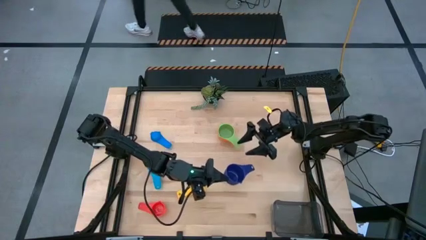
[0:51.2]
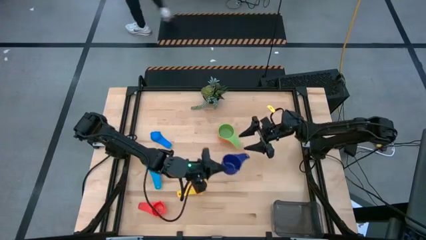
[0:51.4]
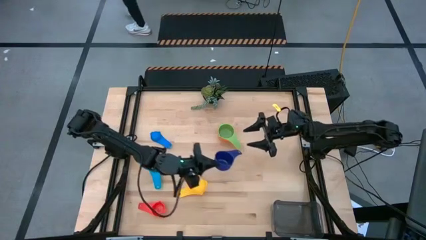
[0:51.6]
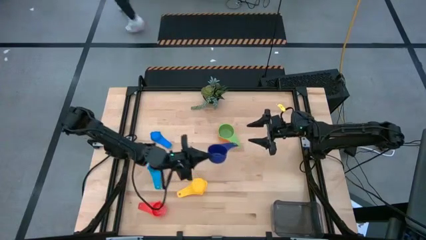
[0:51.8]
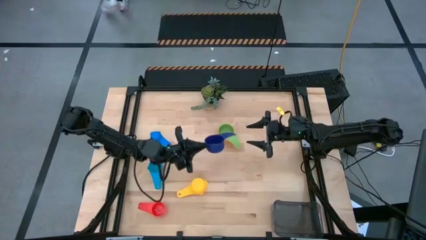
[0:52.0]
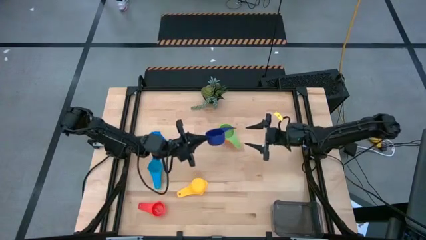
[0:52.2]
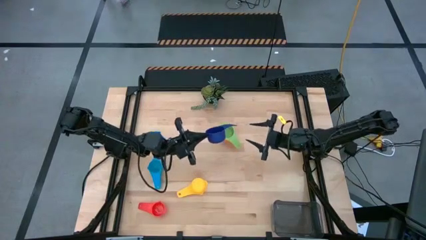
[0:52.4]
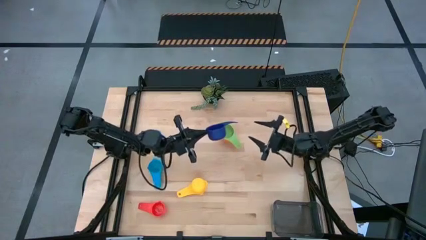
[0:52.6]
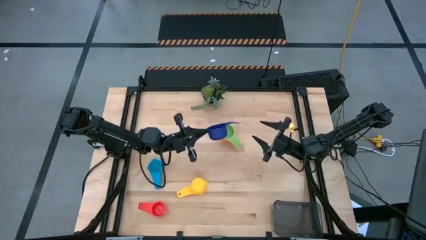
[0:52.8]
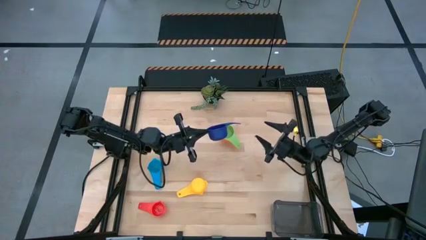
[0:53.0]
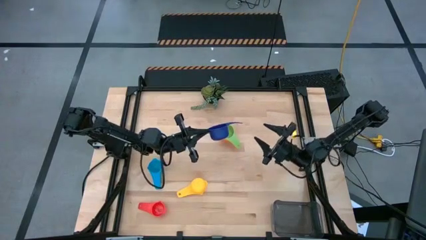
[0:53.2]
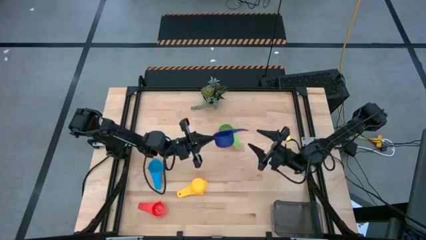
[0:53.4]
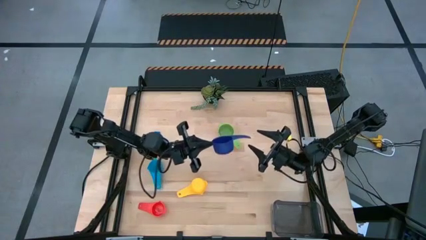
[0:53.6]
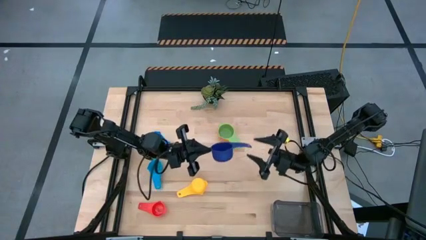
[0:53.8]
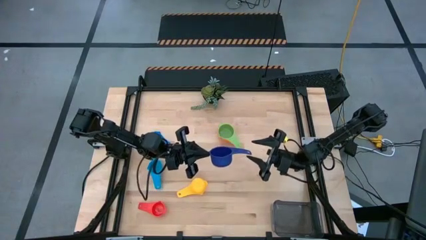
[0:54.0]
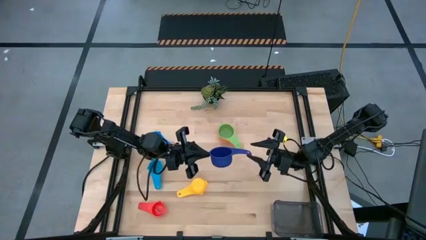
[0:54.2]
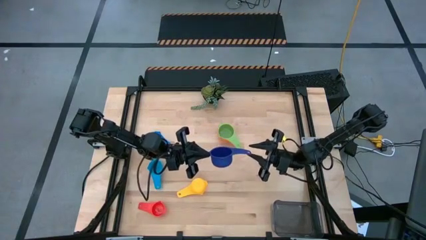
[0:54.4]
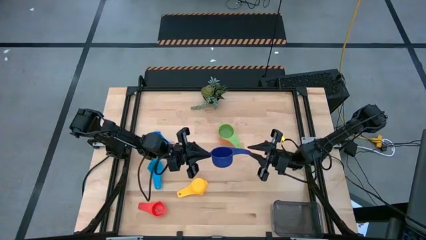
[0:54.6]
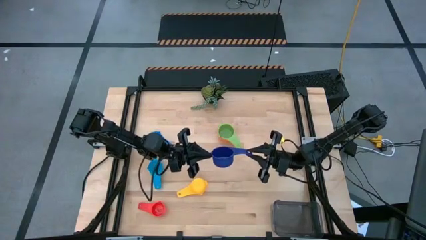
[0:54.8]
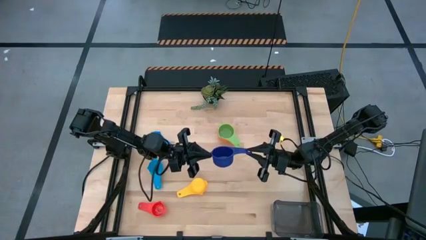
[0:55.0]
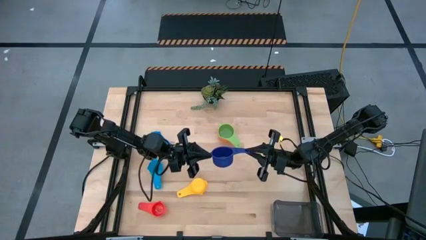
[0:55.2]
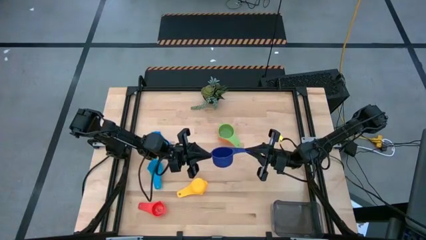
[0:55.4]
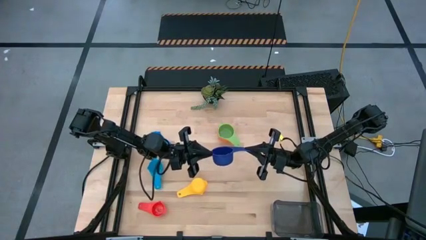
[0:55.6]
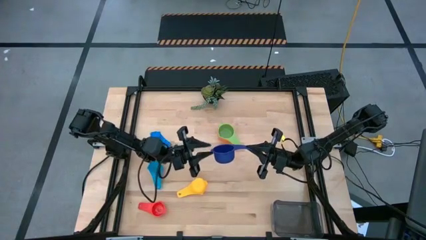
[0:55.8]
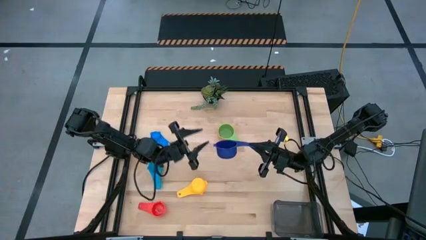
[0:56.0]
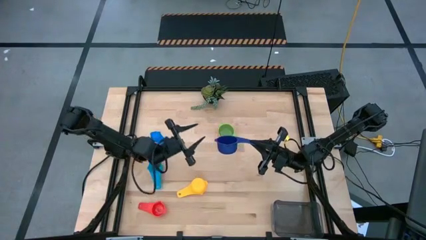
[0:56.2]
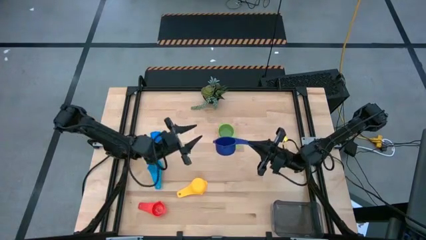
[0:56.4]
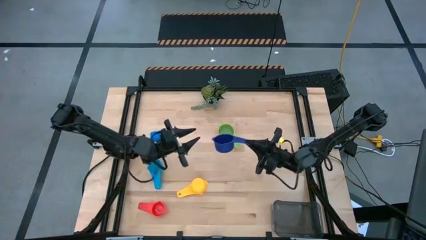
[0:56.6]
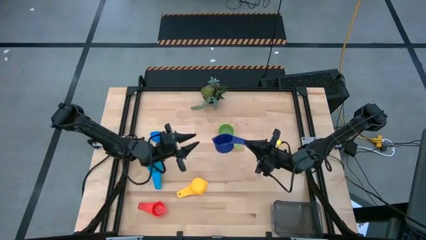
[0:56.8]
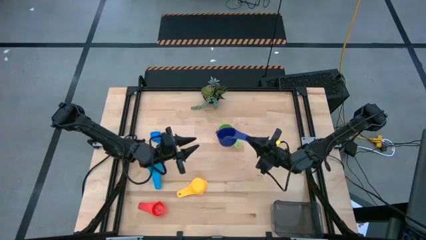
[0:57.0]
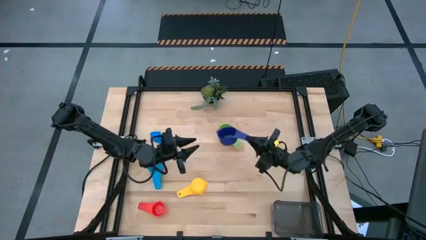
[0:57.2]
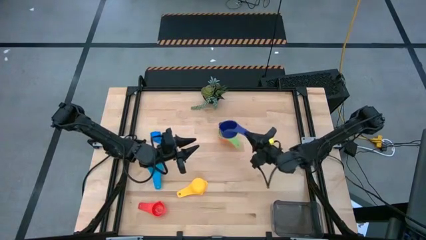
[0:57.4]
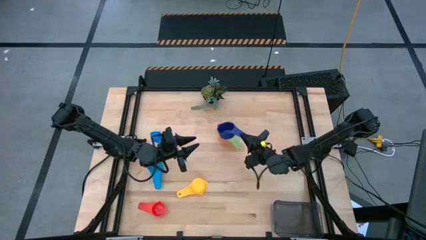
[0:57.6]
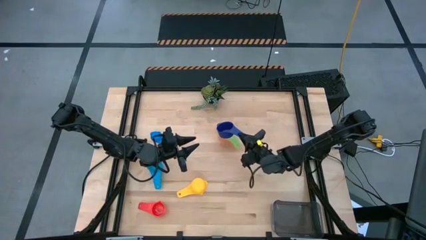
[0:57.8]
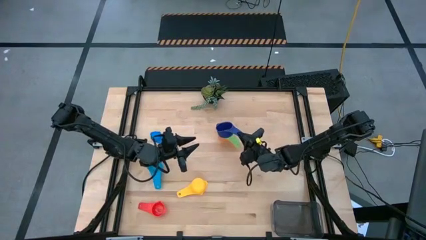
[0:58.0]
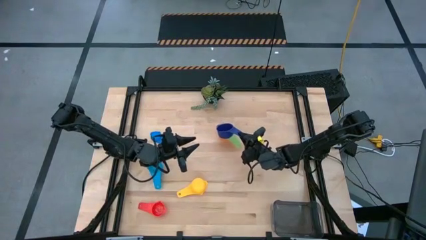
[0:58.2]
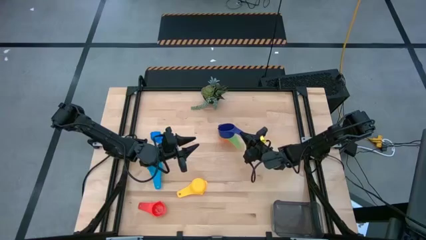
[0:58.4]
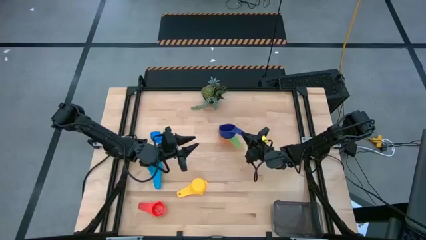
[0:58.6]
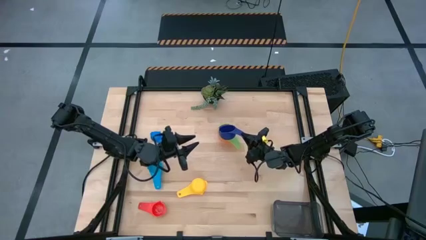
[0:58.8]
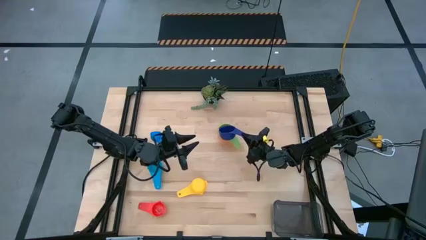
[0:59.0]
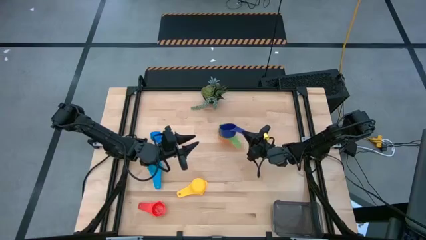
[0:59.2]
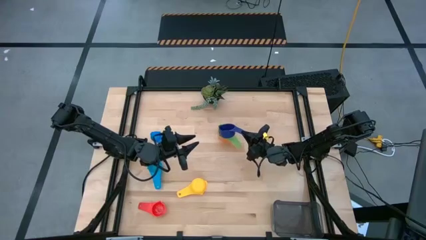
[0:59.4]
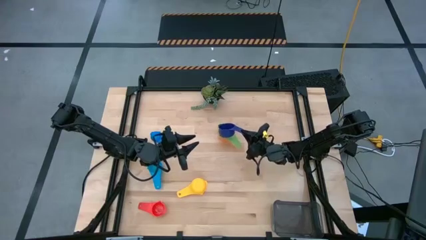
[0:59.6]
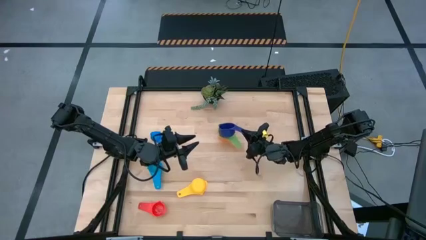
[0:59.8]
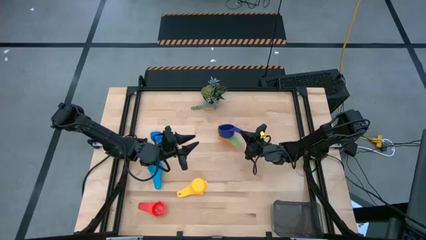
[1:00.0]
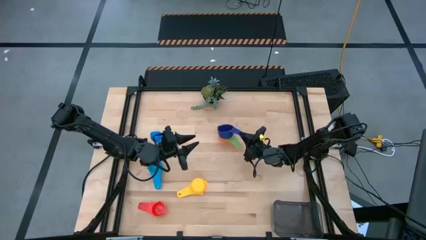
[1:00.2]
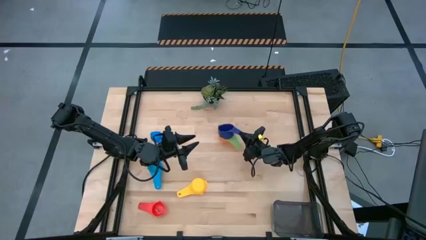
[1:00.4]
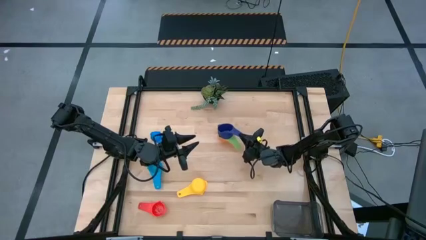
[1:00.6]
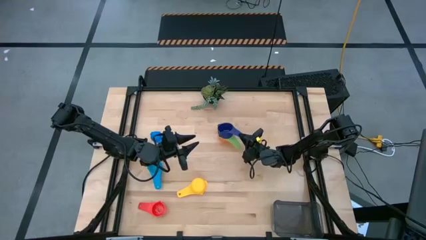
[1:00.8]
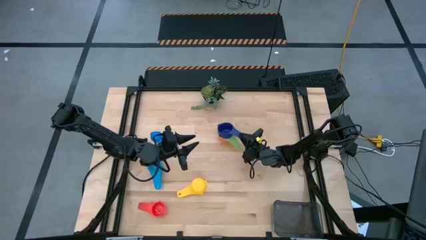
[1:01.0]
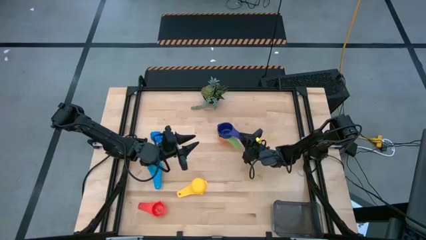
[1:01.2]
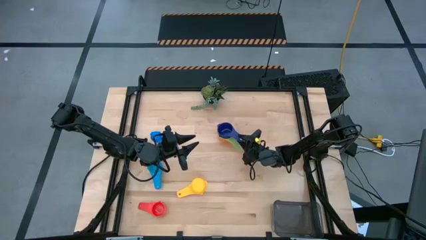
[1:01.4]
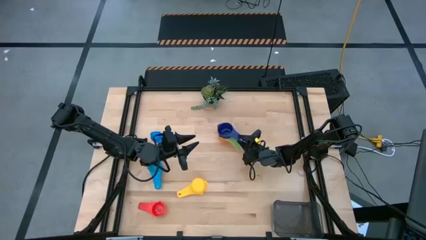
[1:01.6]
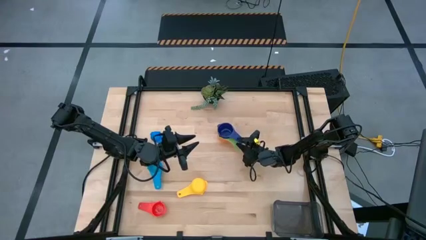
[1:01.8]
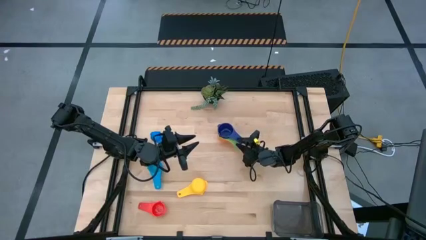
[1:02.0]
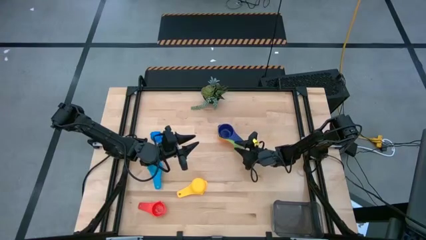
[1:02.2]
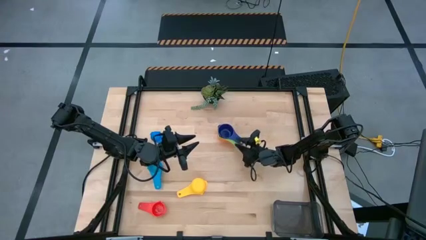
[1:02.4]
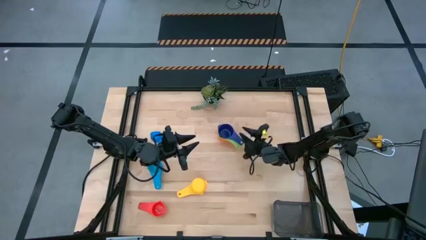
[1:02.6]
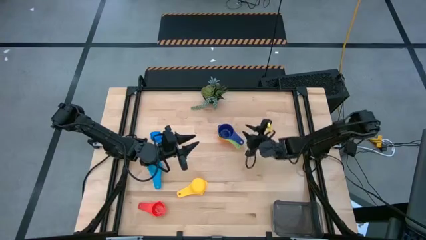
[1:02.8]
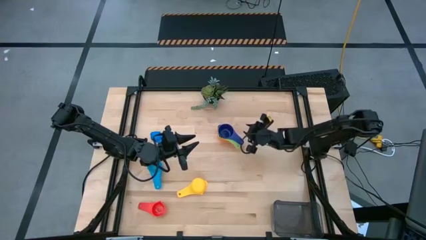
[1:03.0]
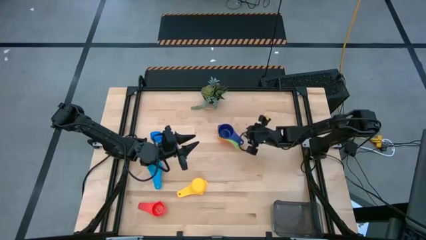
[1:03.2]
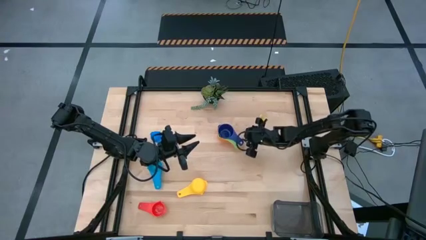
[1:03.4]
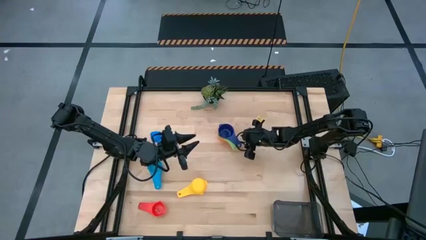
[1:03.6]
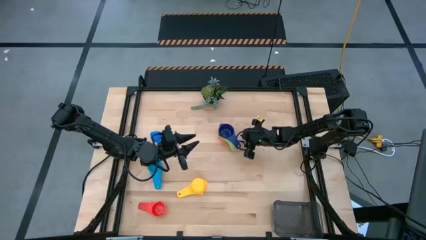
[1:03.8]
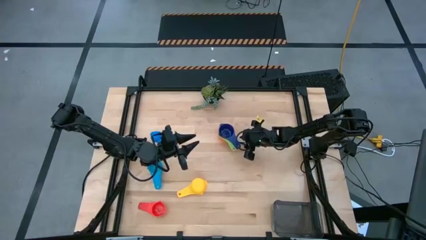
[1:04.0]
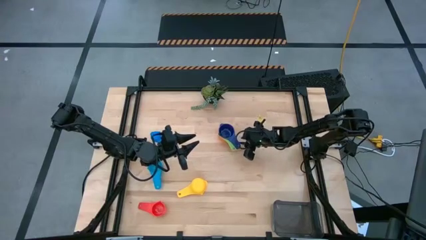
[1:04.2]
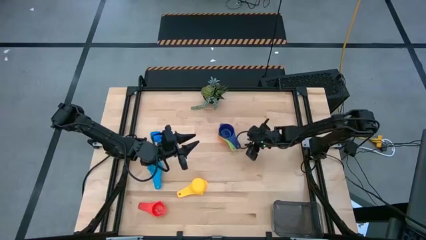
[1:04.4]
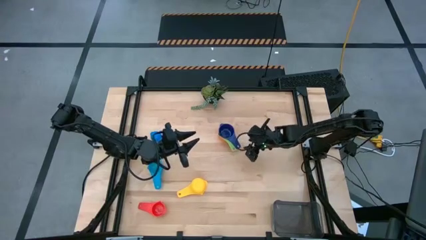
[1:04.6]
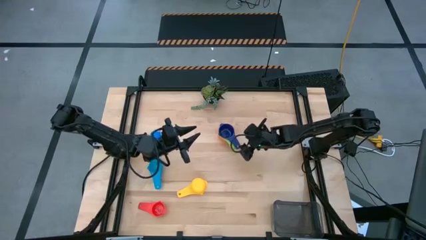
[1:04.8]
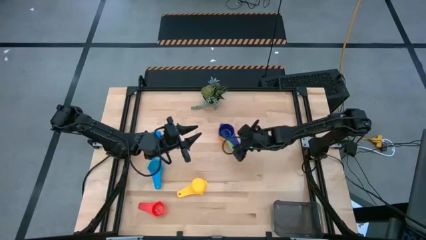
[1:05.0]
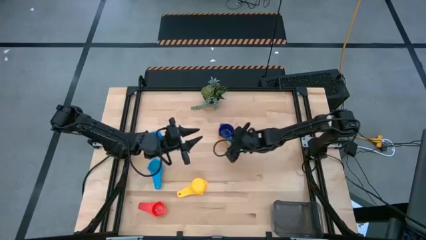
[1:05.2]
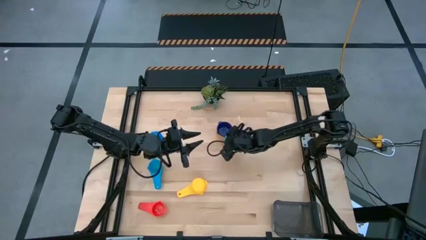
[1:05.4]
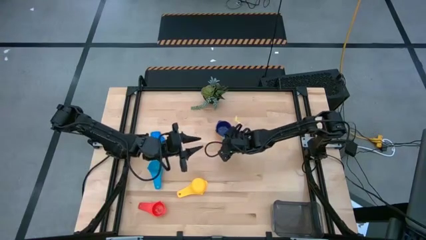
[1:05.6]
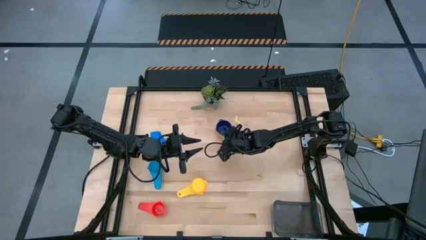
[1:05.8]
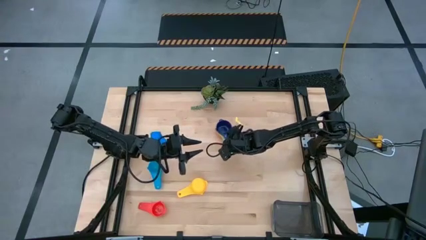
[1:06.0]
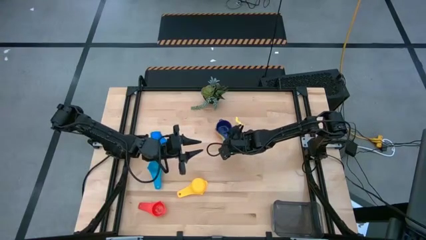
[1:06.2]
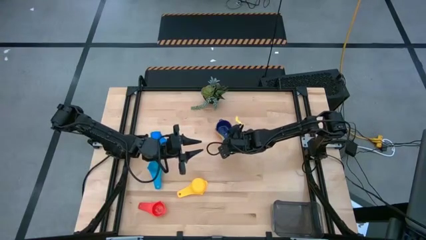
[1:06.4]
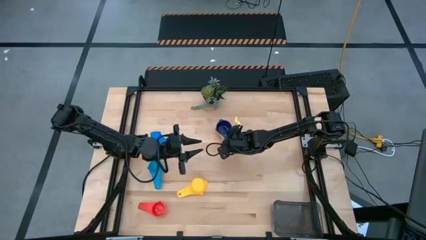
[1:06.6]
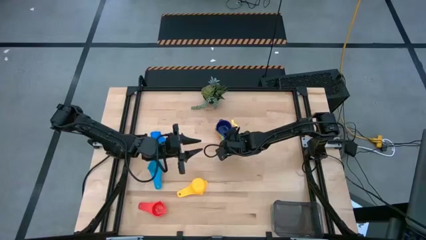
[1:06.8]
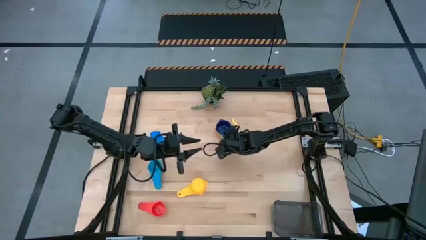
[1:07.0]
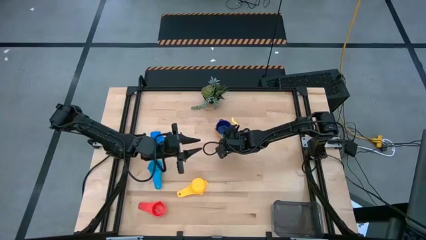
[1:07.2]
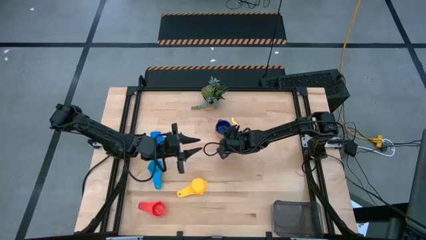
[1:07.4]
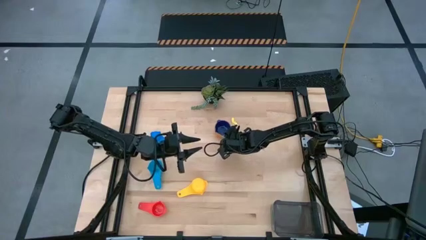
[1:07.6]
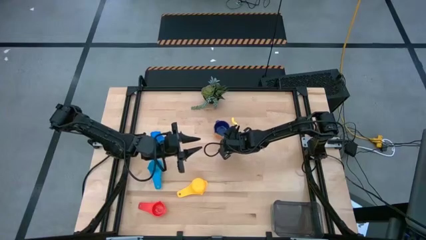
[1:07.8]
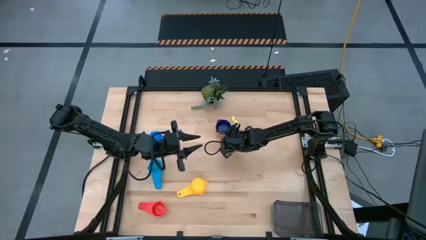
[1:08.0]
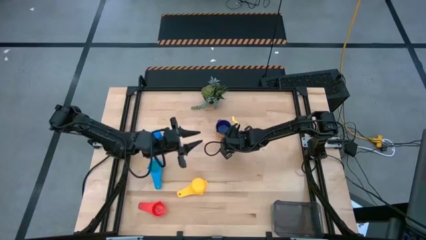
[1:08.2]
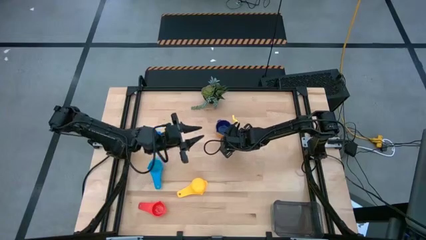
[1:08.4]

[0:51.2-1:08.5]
Task: Nest measuring cups in basket
Stack the violet measuring cup on top of the green measuring cup
